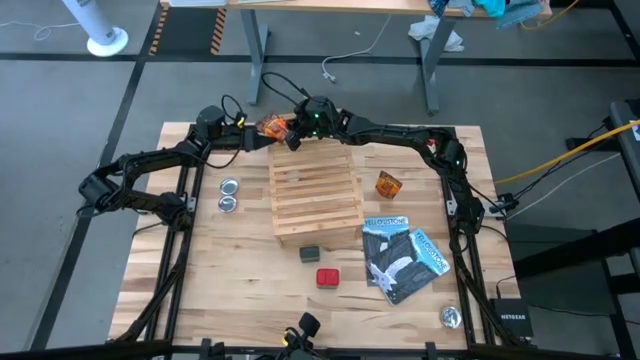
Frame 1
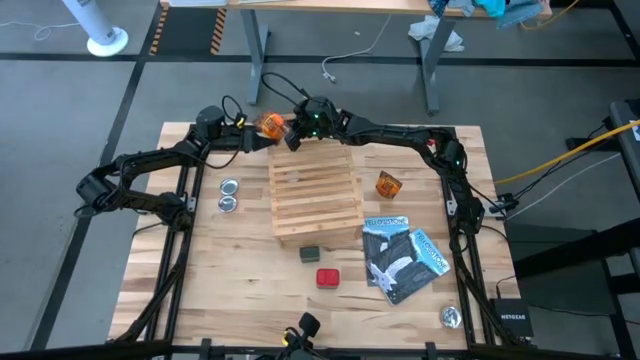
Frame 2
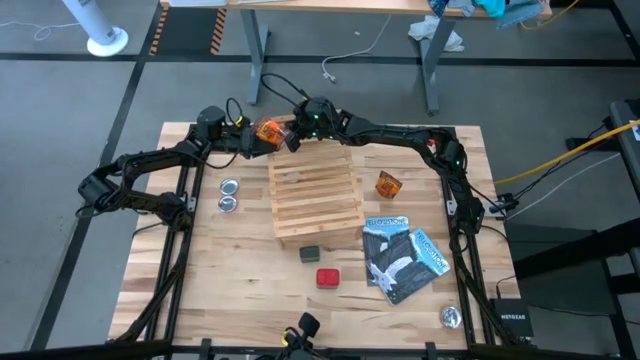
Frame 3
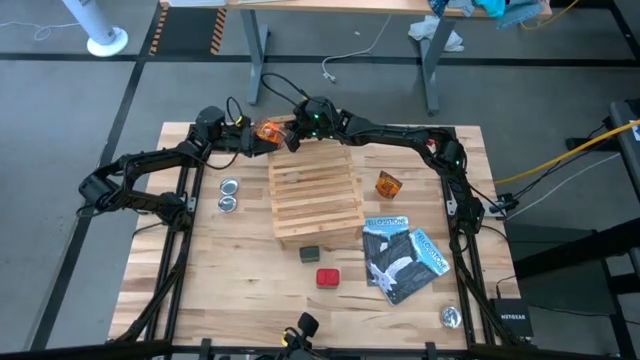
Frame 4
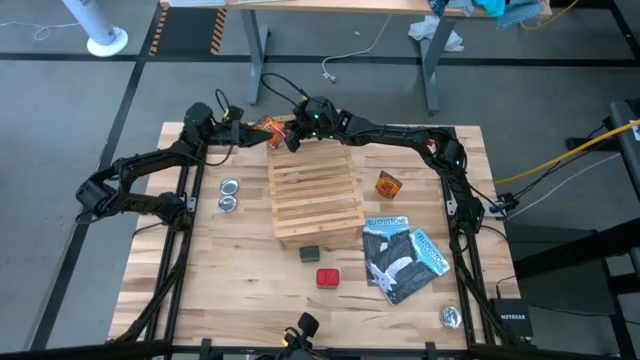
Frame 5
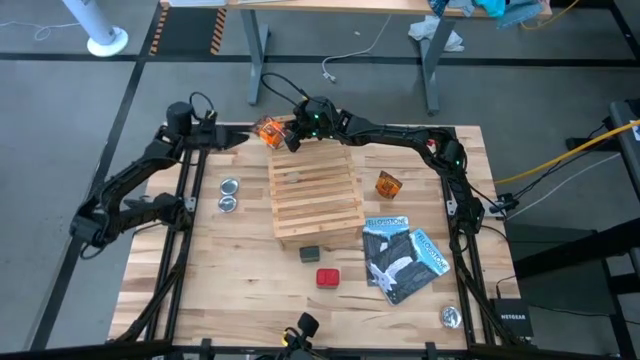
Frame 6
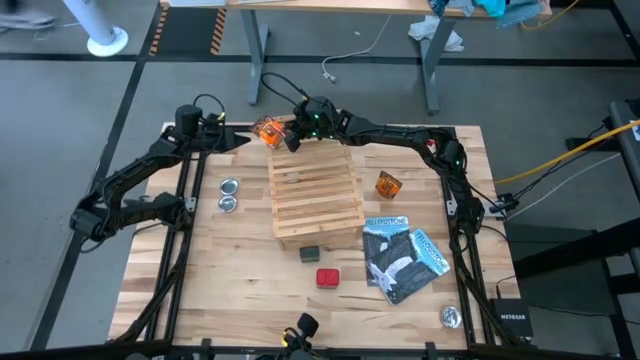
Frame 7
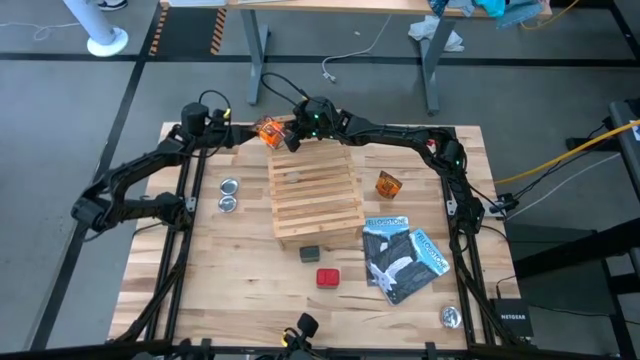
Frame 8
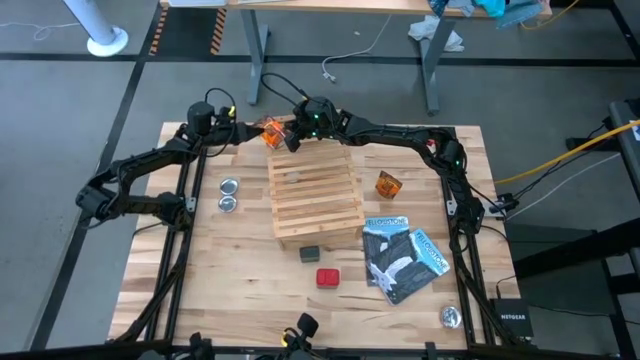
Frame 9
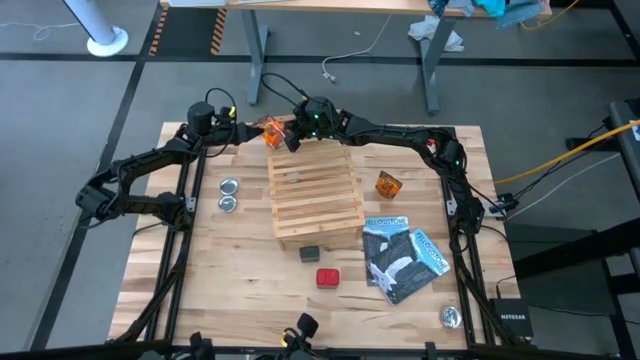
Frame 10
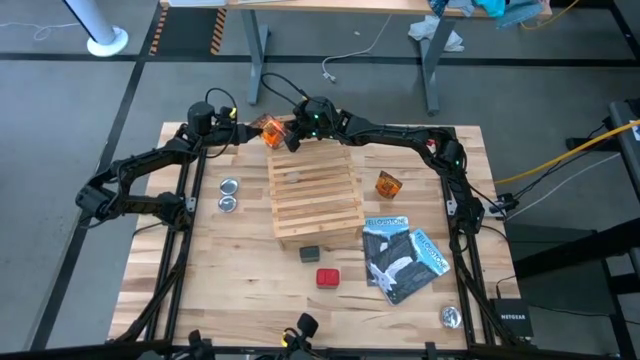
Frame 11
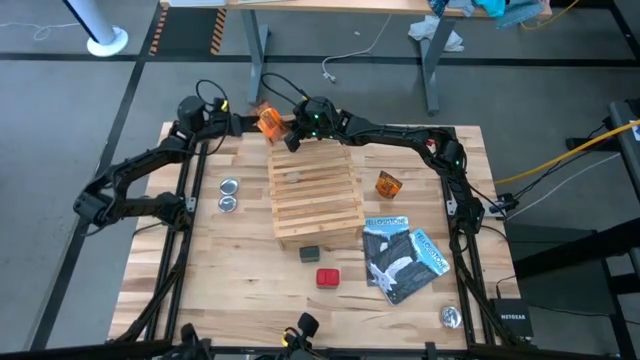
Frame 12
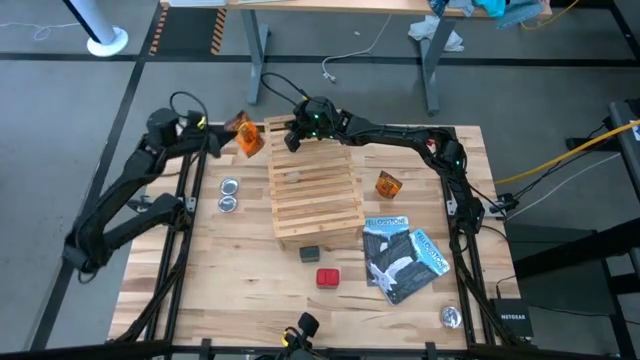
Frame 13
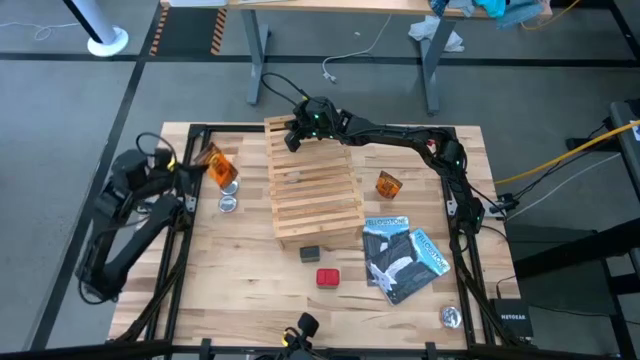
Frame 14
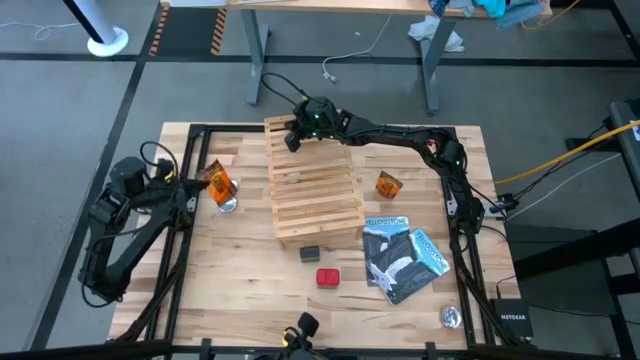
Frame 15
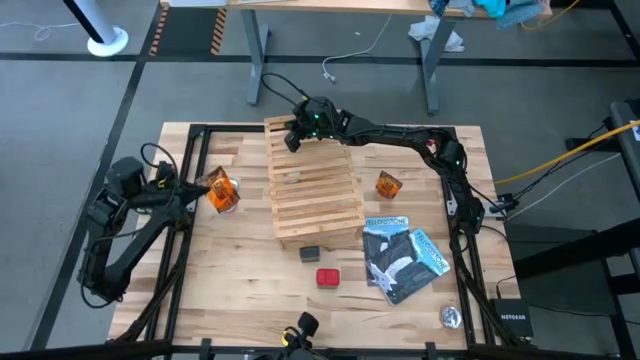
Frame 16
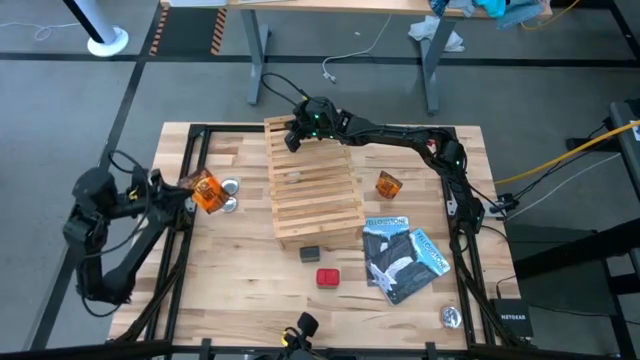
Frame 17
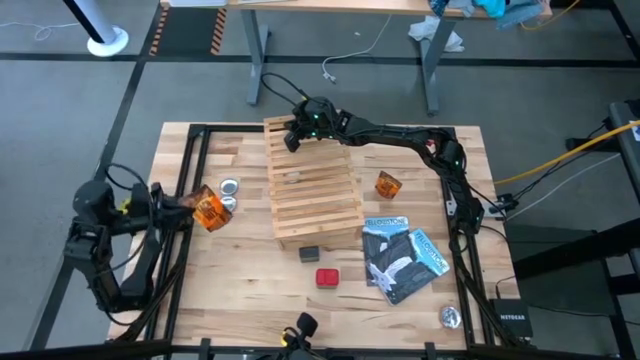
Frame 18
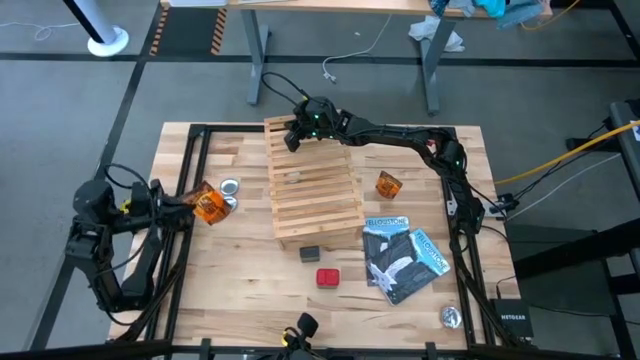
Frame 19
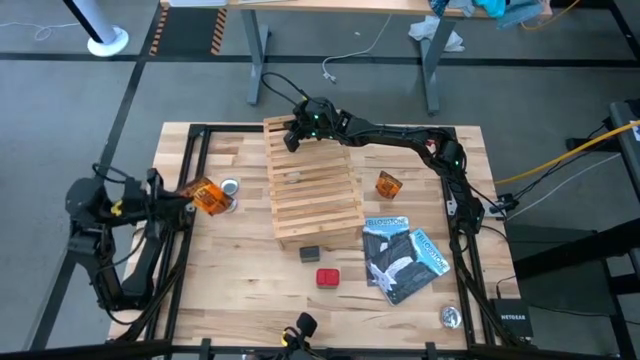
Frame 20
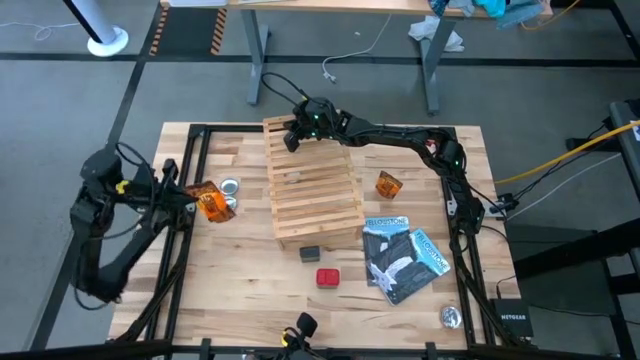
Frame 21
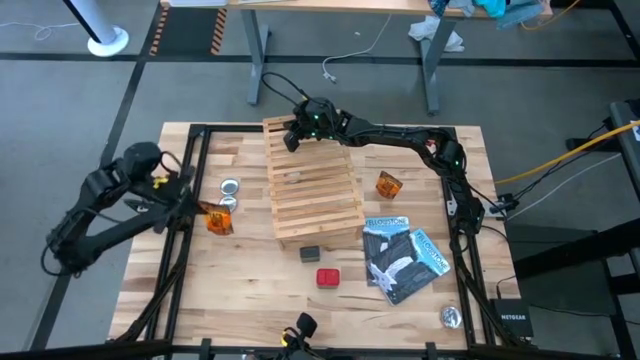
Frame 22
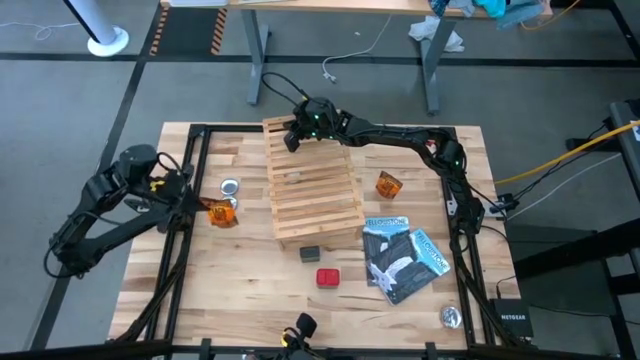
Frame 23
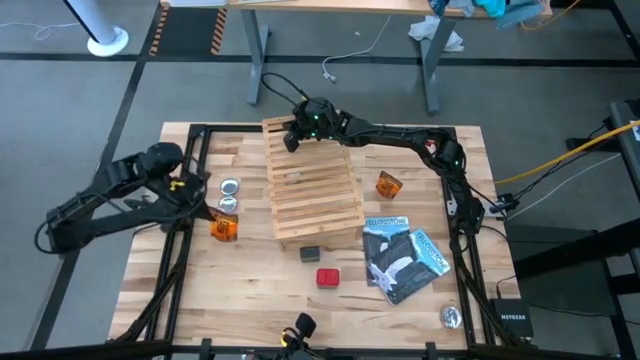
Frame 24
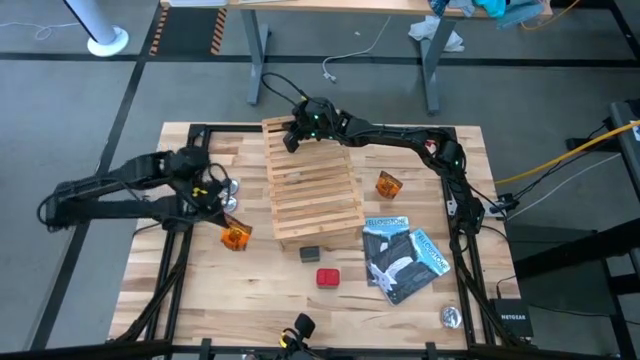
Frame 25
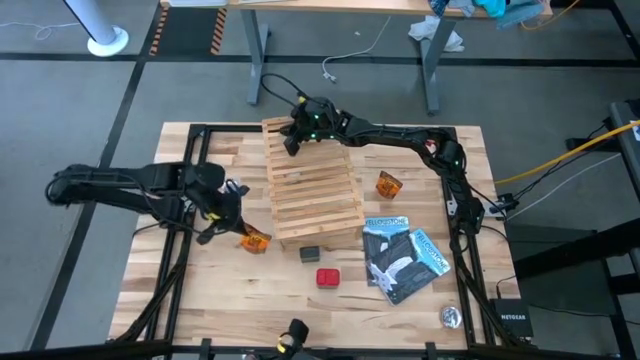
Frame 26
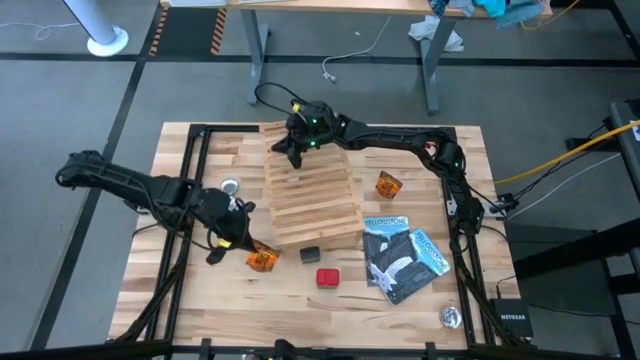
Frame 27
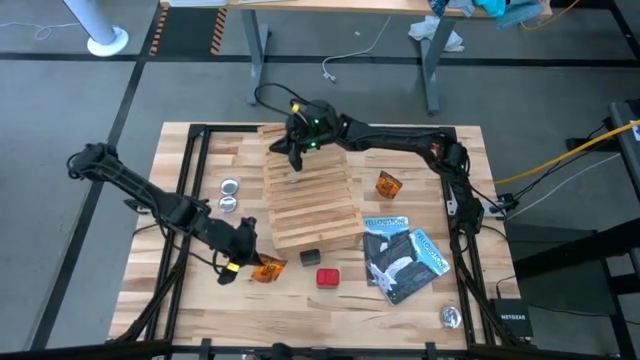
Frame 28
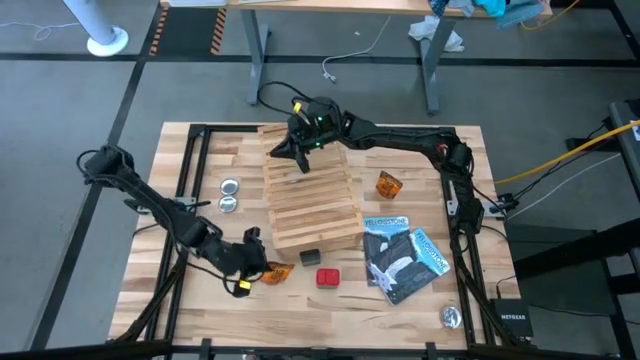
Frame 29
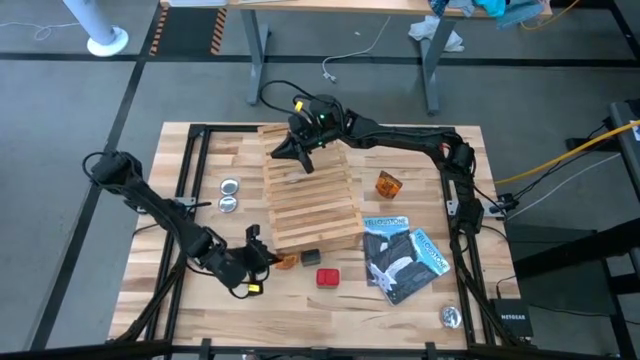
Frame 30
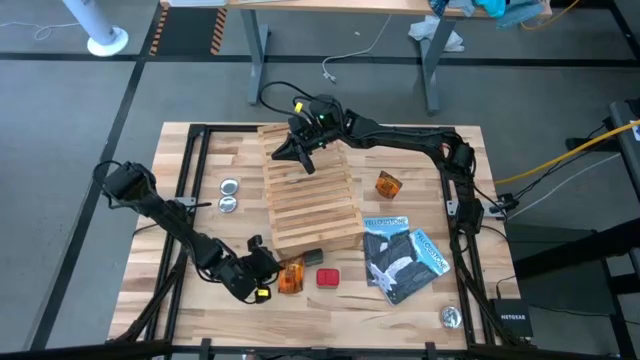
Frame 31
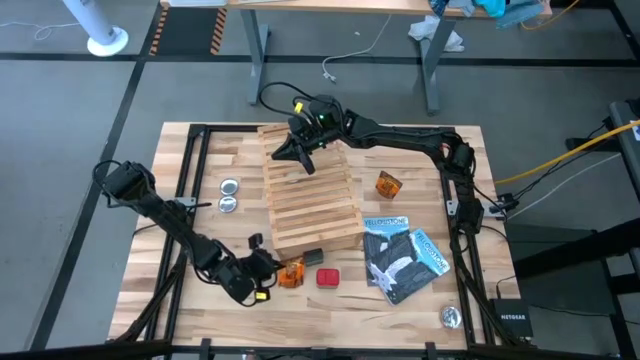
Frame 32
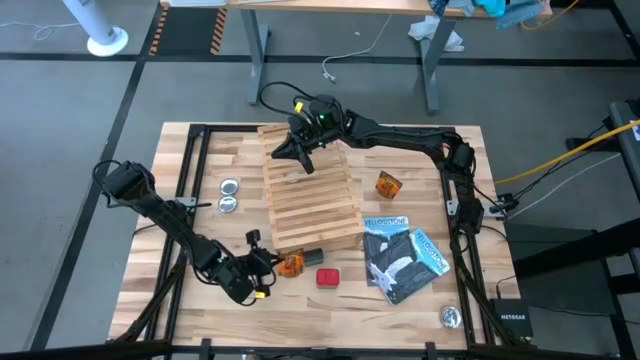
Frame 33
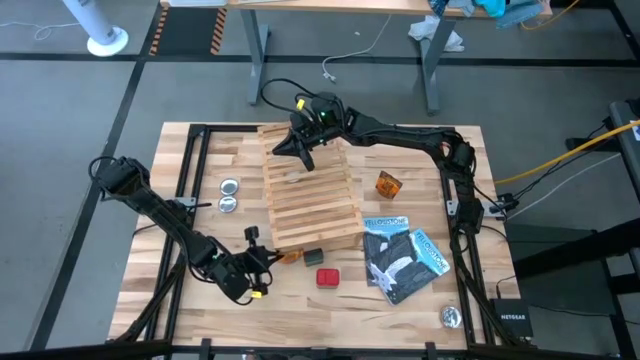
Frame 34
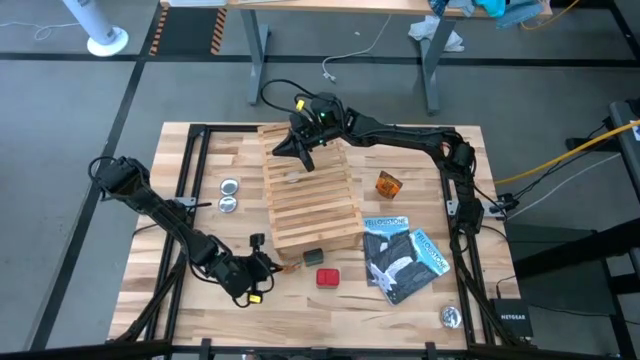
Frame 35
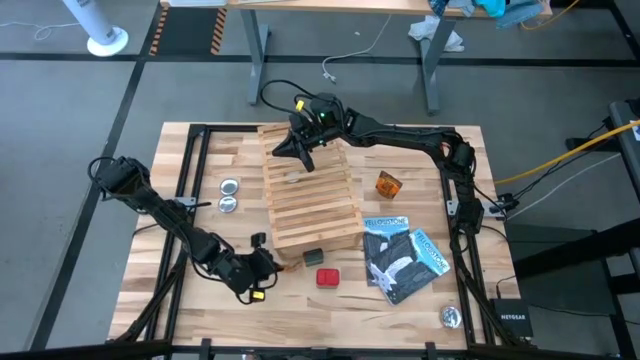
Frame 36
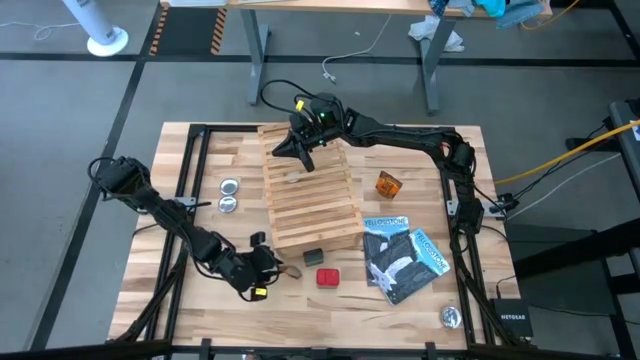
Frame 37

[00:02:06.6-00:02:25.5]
Task: Shelf spices
Remove the orange seasoning pack from the shelf

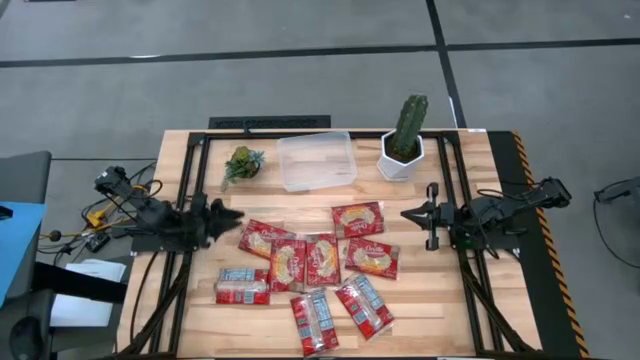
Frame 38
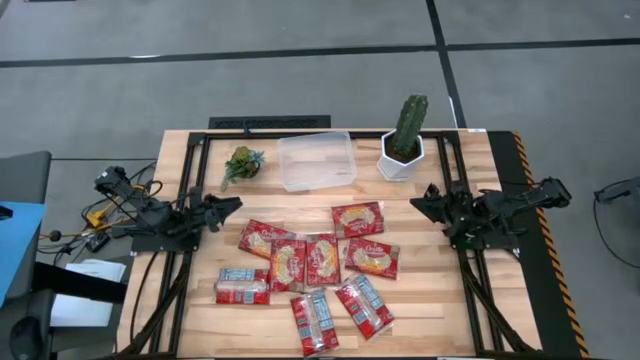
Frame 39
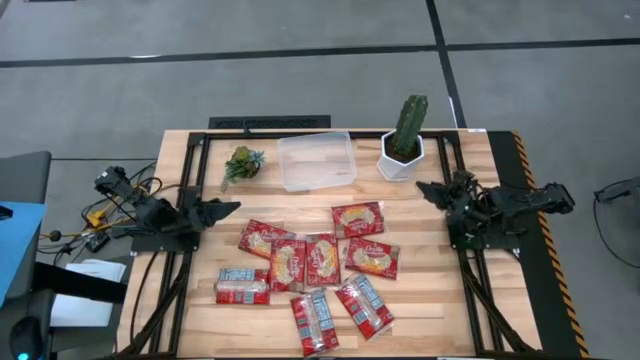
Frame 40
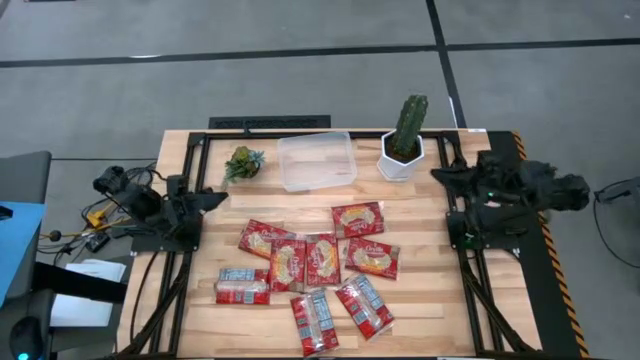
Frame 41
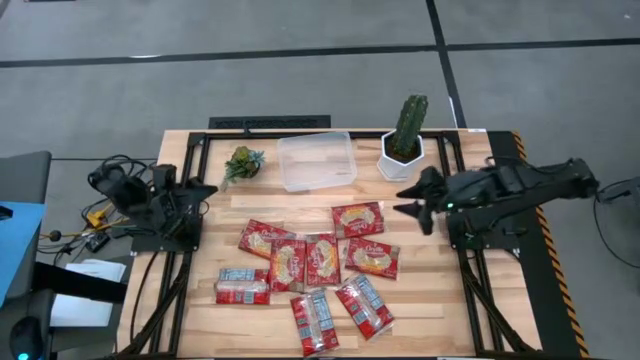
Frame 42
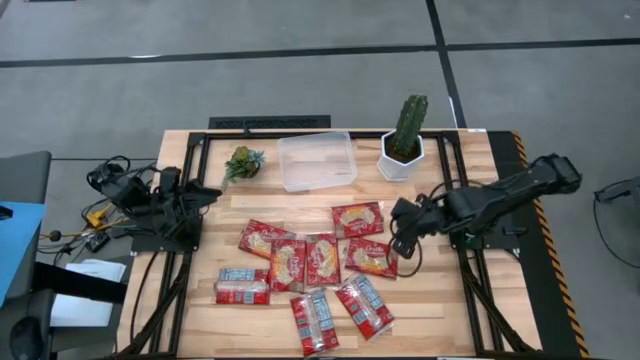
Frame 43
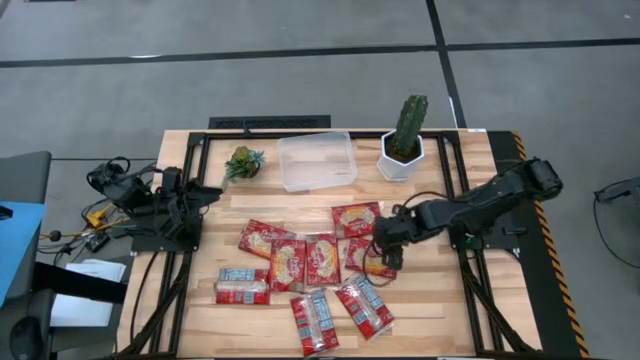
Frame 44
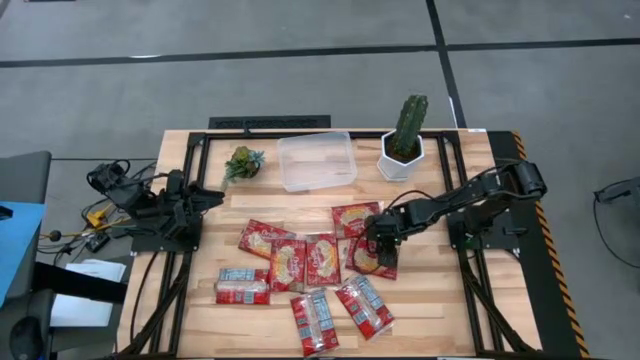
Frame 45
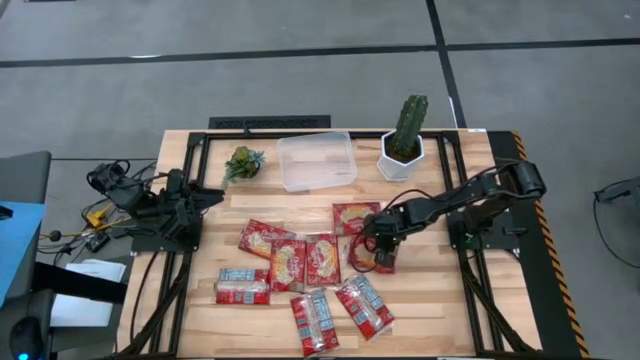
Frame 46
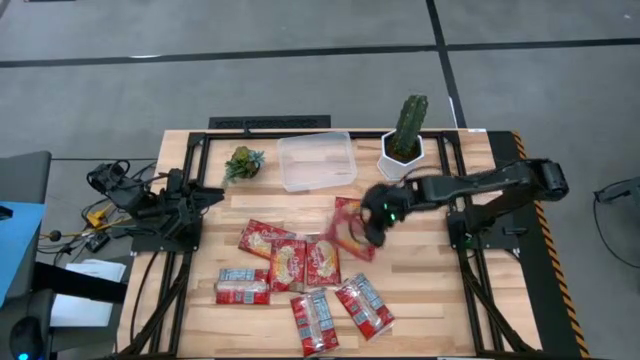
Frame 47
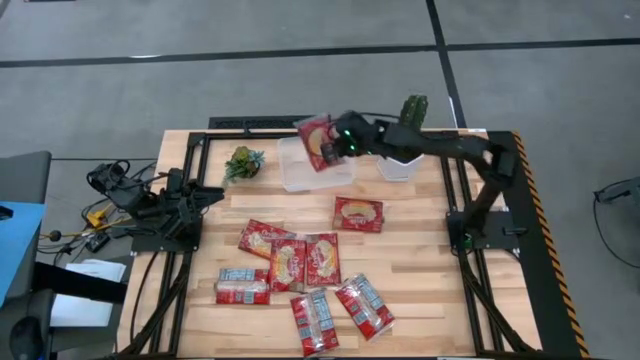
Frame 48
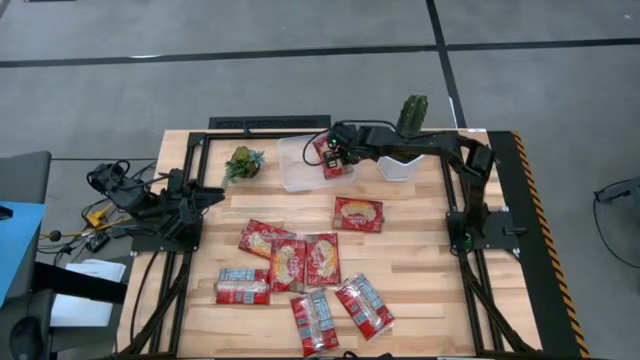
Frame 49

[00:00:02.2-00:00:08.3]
Task: Sort popcorn bags into baskets
Put the red popcorn bag into the transparent bin
